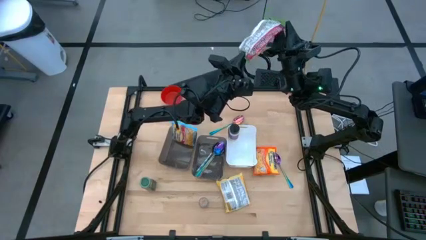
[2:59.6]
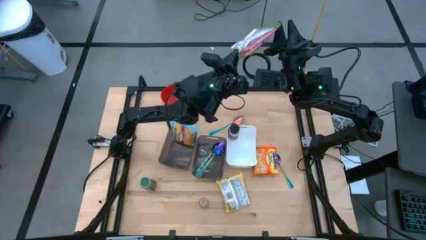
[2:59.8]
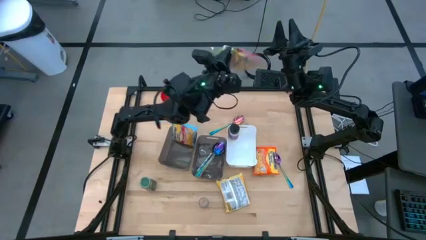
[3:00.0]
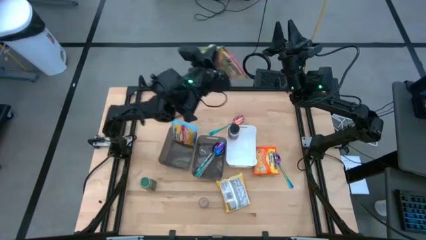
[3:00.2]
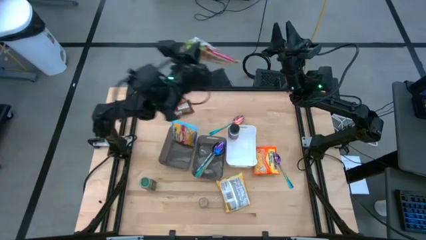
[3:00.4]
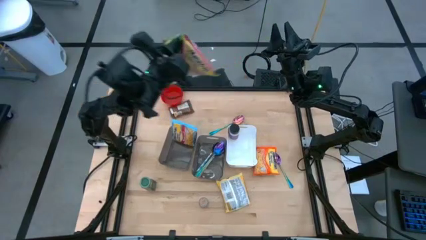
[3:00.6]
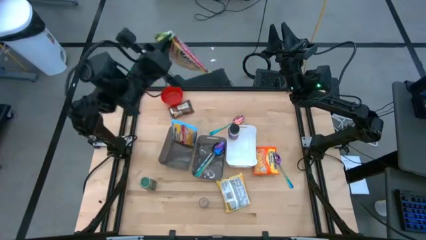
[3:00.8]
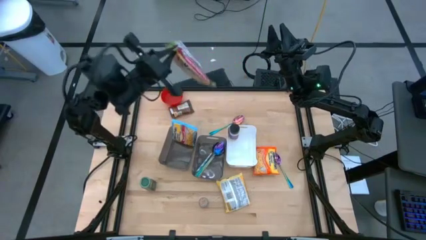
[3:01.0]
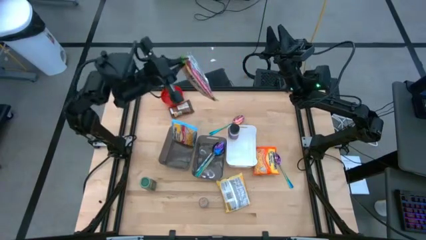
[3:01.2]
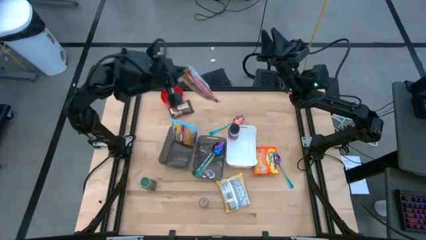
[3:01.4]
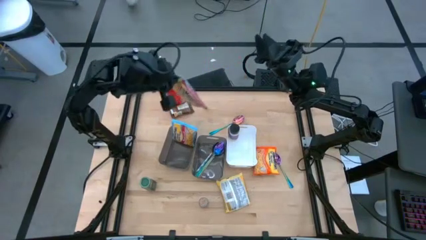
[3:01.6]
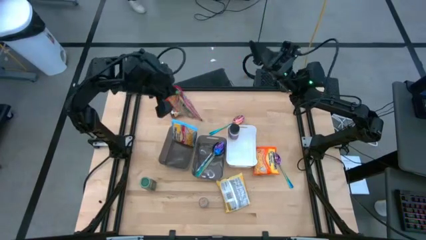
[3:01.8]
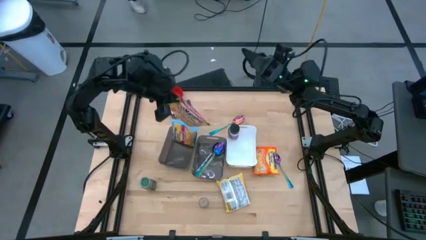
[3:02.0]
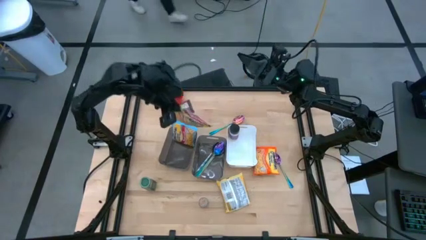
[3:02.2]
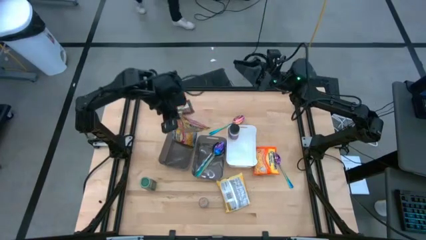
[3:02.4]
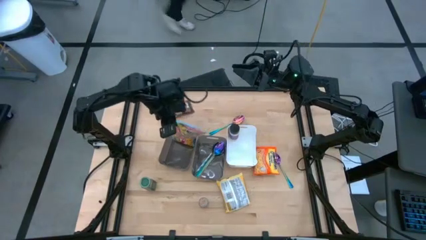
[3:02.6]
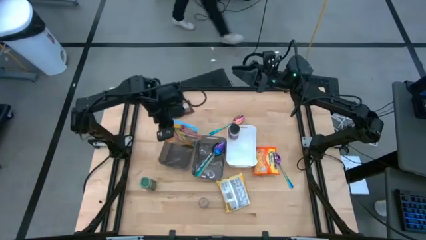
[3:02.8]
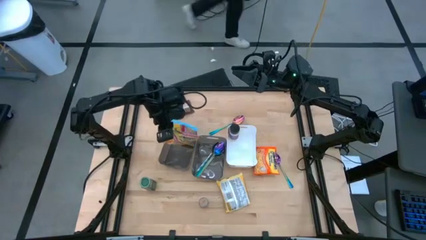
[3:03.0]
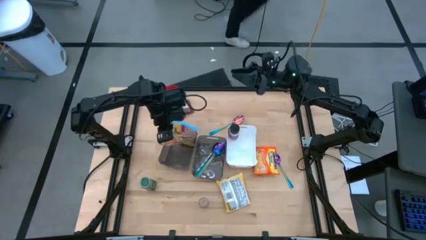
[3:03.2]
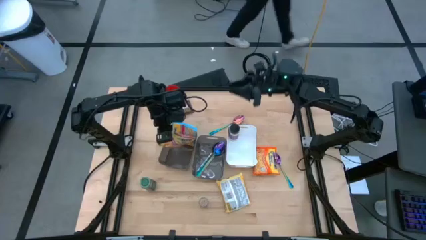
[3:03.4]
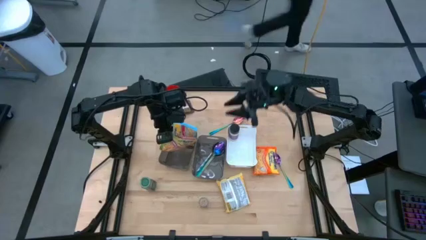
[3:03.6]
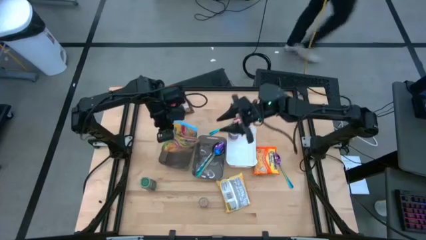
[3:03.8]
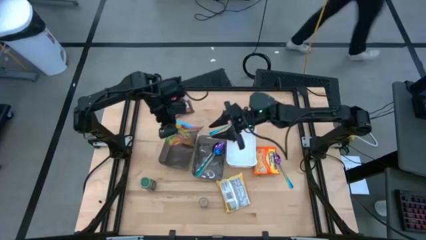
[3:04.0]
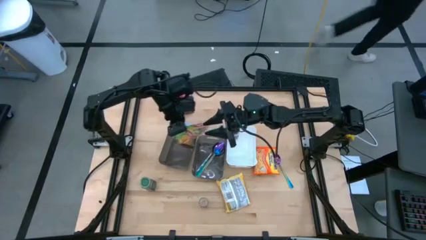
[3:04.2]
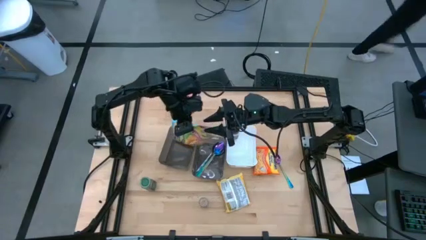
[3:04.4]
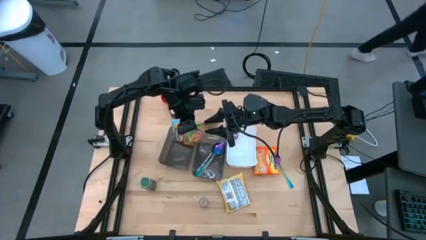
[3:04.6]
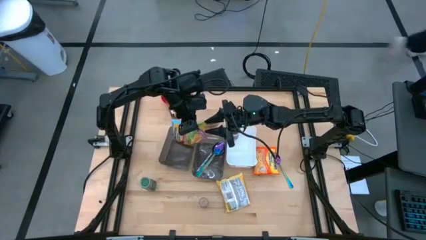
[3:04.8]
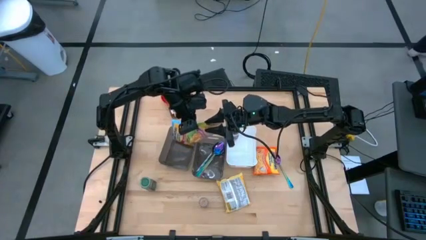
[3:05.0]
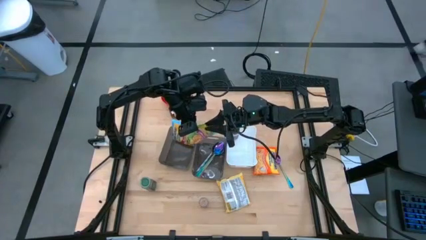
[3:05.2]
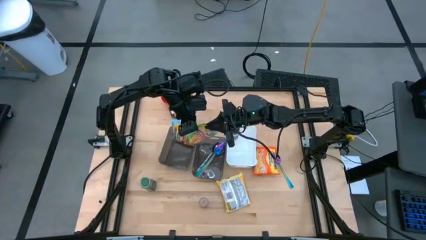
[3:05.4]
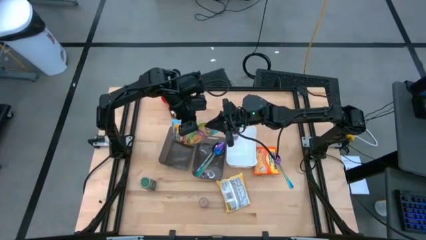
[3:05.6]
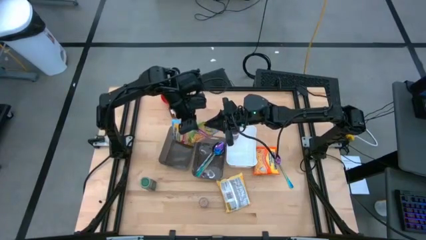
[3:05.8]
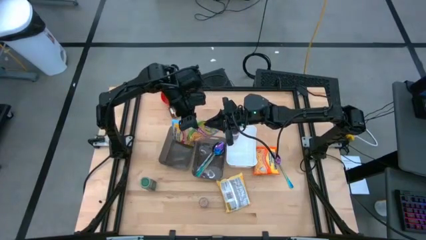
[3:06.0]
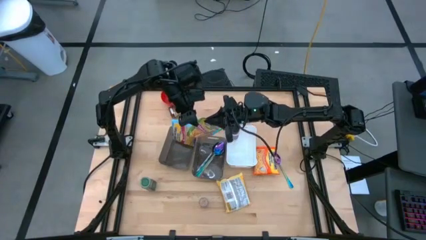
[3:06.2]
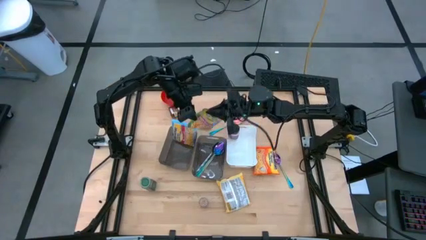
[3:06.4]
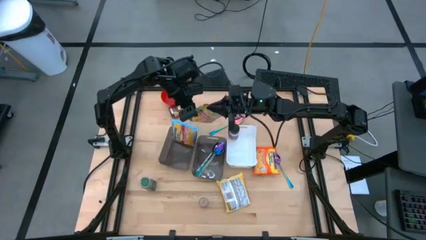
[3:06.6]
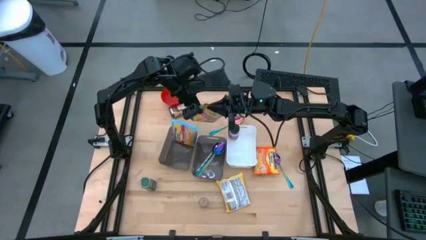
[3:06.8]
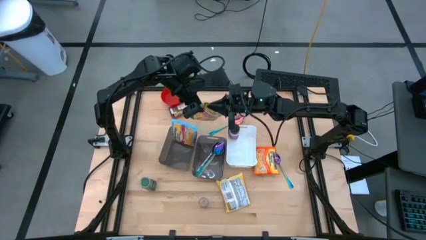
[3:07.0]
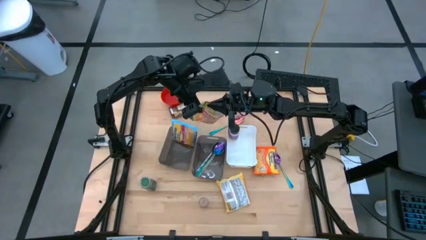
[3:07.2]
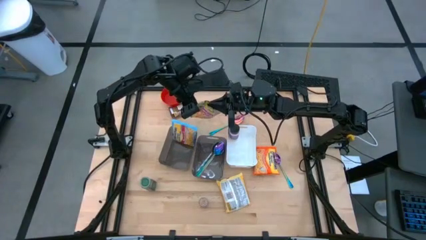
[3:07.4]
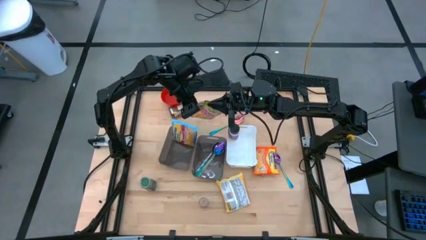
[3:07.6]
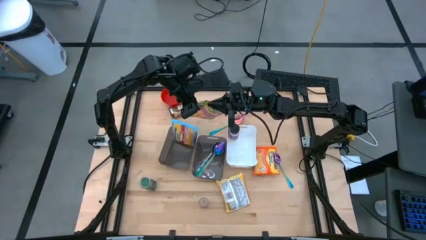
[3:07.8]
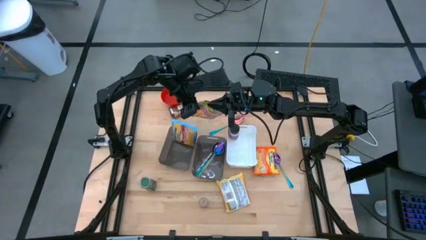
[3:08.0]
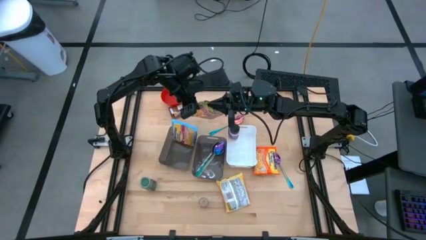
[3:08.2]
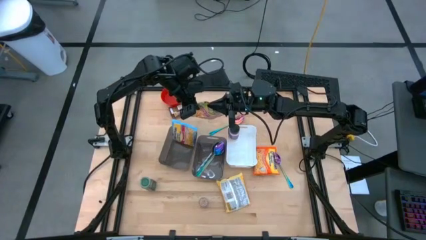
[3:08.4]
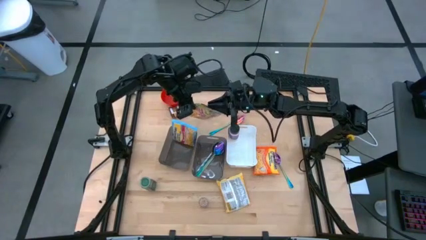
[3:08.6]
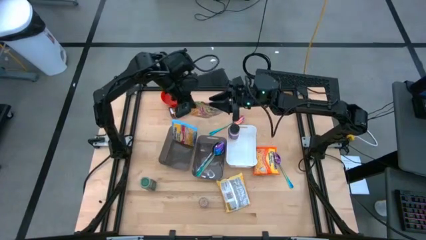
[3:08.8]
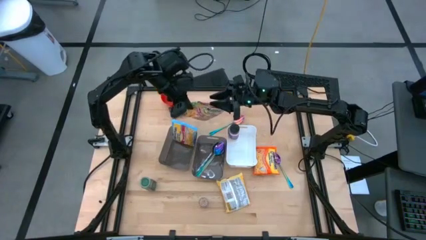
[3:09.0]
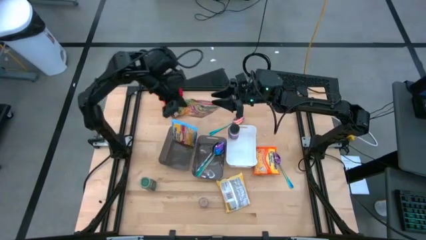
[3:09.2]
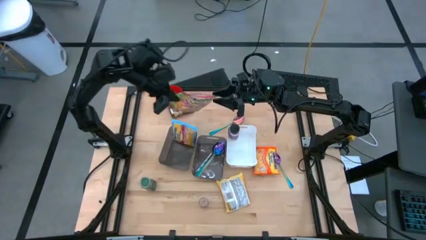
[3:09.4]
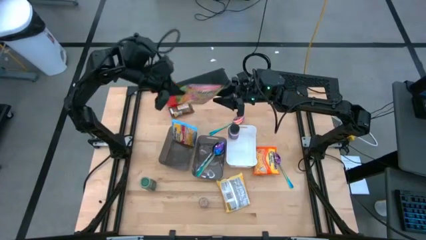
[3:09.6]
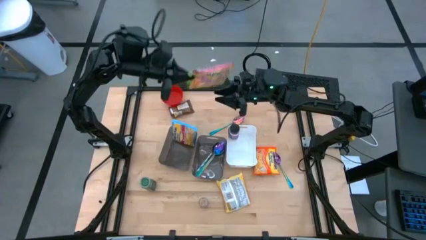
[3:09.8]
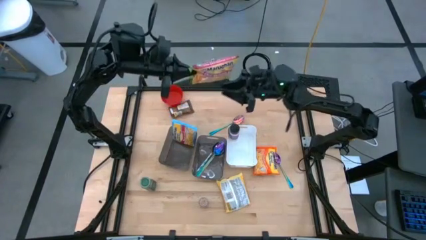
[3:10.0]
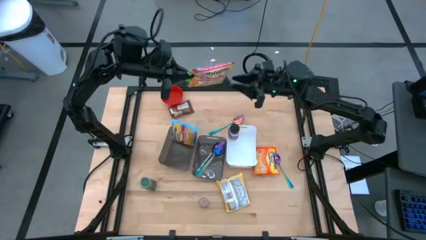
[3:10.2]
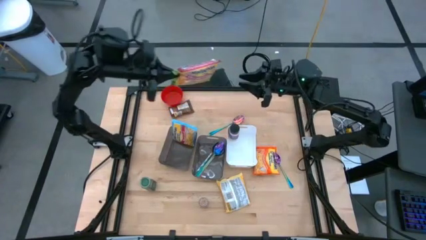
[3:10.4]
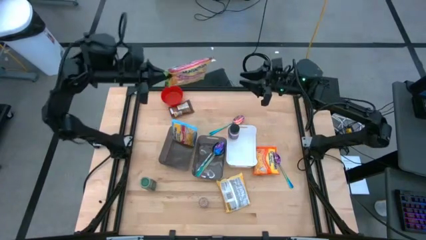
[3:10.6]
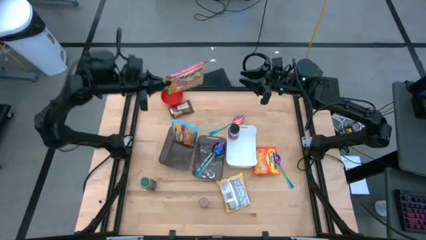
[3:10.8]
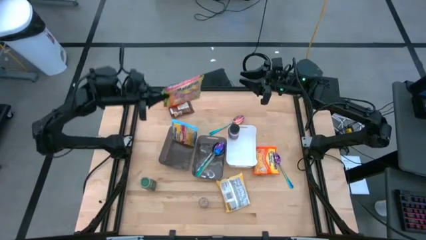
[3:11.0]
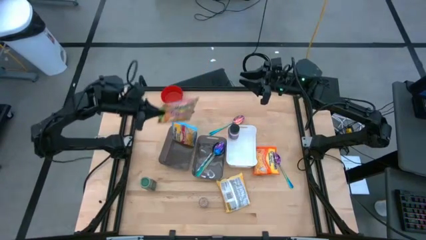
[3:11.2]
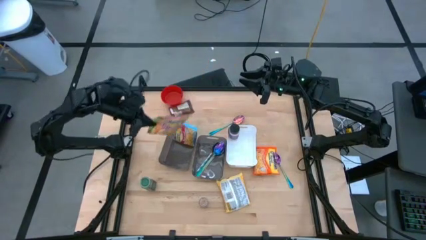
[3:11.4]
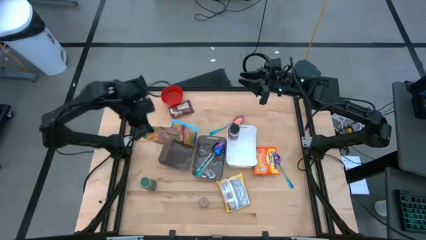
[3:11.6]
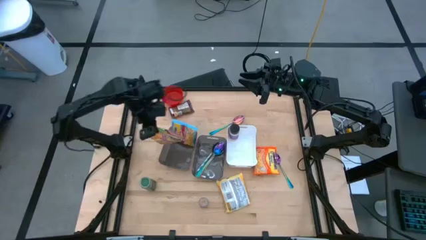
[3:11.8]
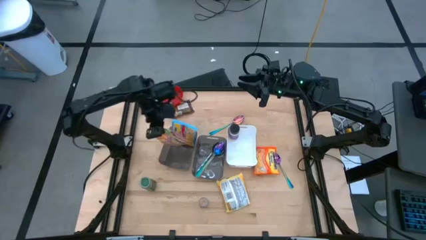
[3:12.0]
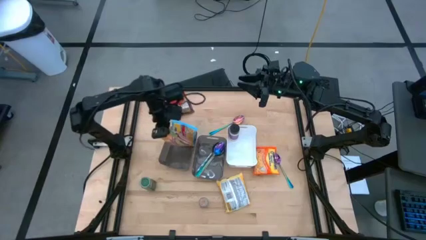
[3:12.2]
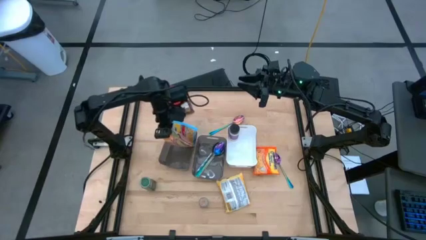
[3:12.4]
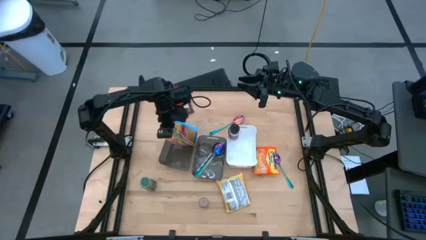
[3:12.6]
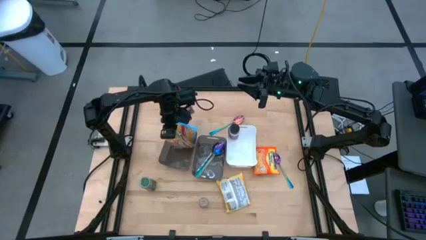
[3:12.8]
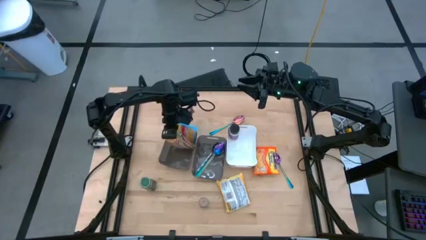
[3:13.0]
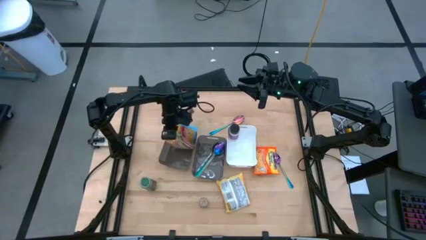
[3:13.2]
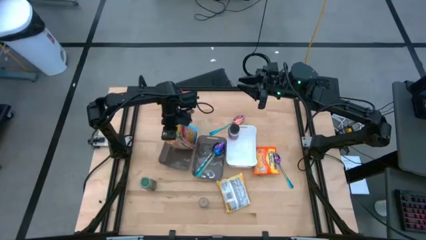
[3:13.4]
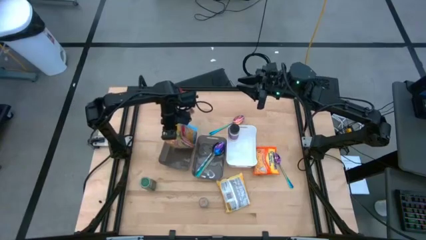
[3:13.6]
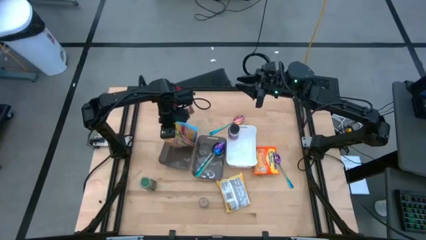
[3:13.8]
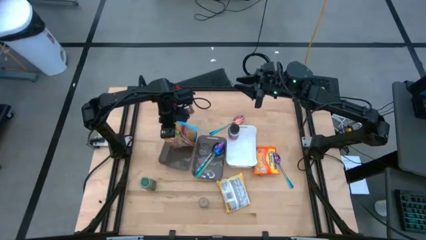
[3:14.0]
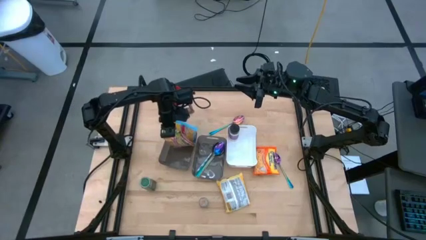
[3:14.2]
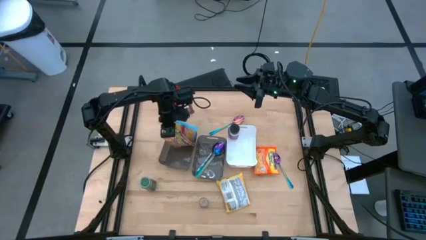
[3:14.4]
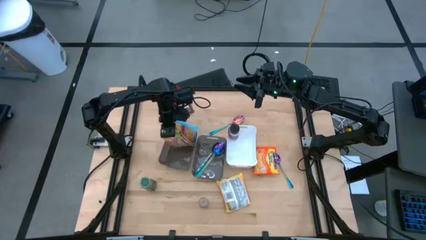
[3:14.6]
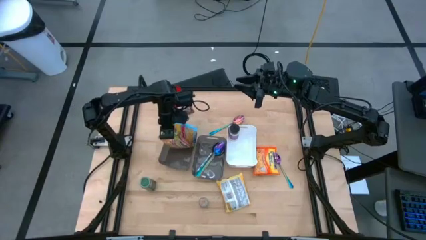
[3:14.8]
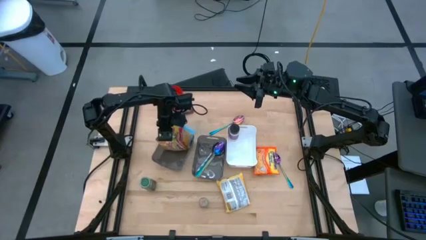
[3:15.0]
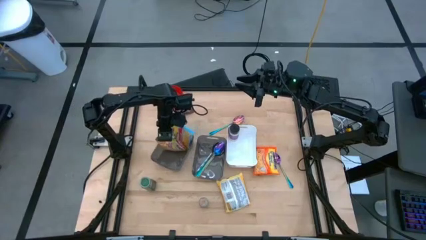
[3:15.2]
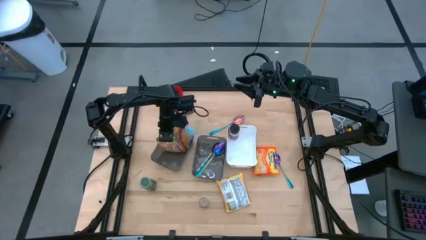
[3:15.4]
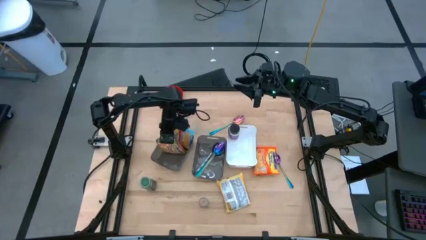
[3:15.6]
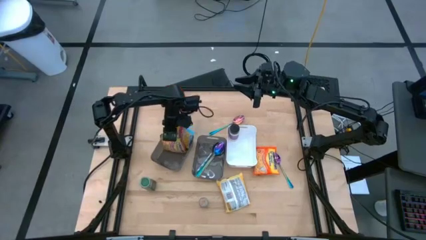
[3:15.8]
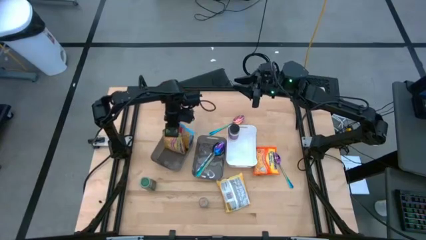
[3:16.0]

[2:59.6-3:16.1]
Task: Pick & Place Food Item
Put the green pack into the left gray bin
